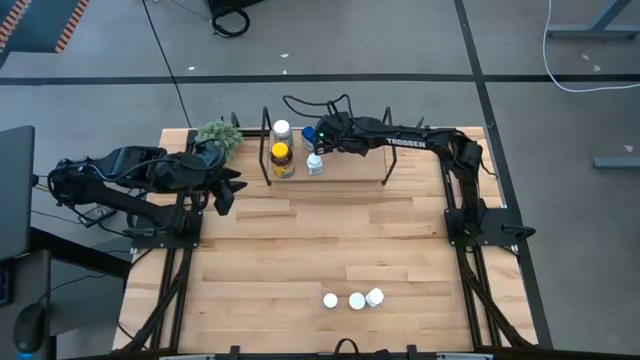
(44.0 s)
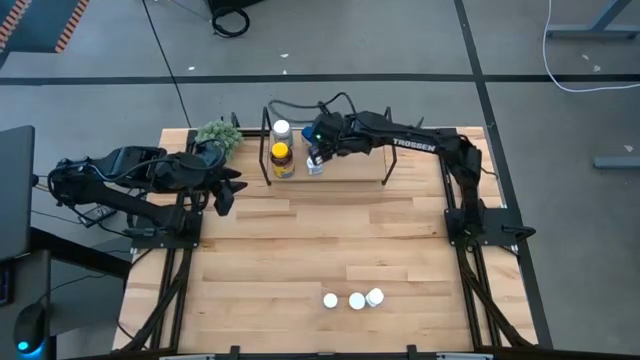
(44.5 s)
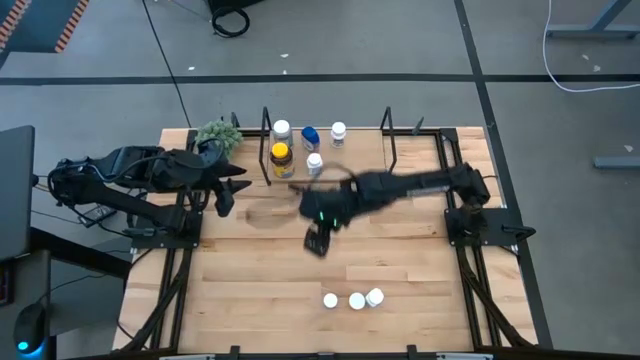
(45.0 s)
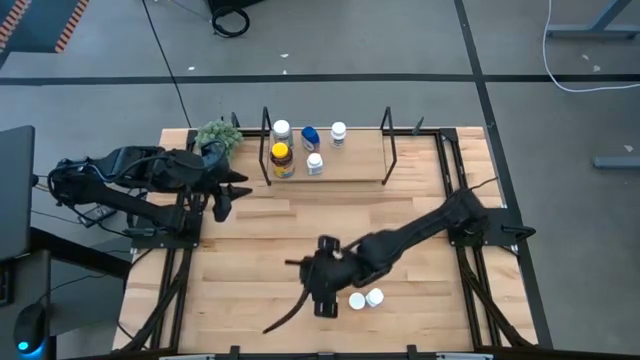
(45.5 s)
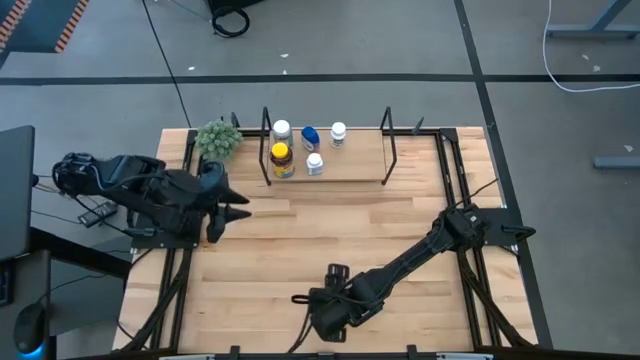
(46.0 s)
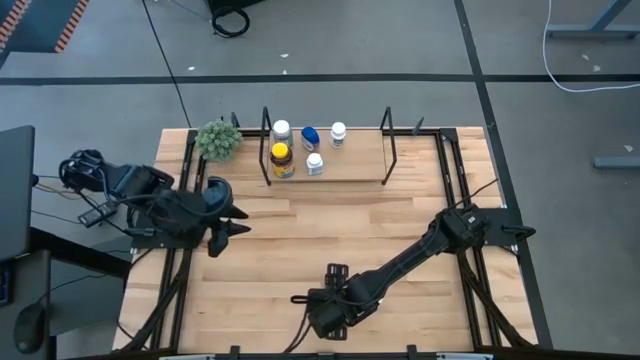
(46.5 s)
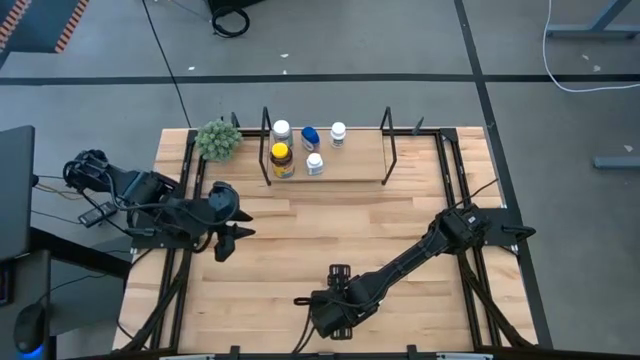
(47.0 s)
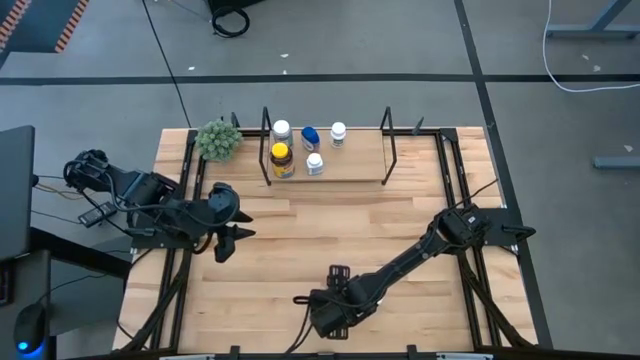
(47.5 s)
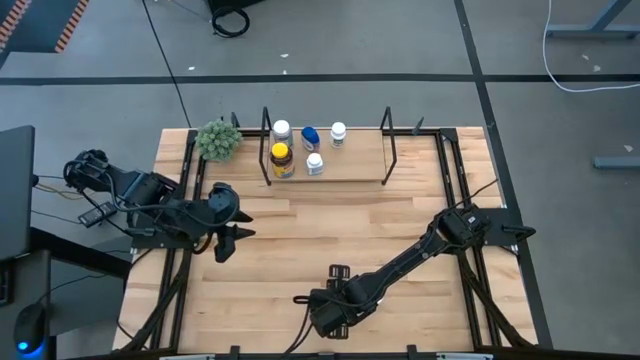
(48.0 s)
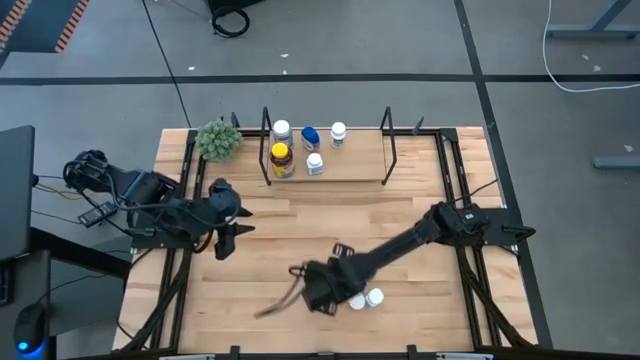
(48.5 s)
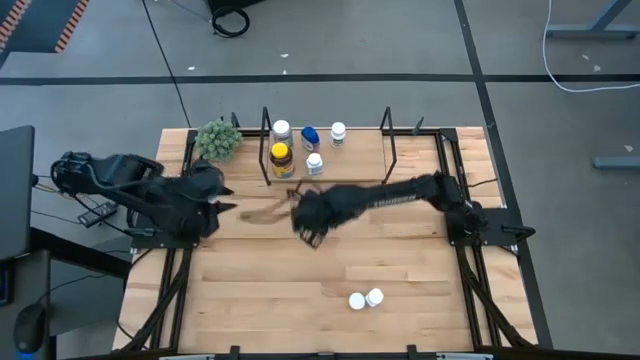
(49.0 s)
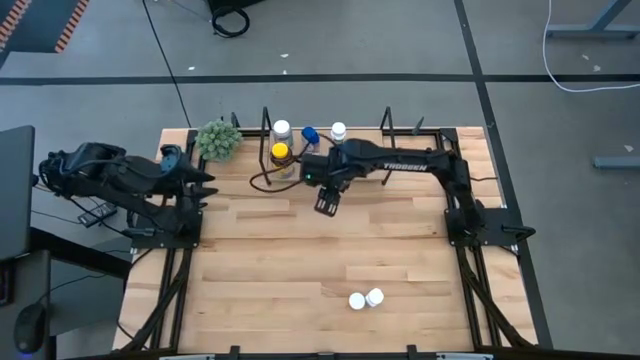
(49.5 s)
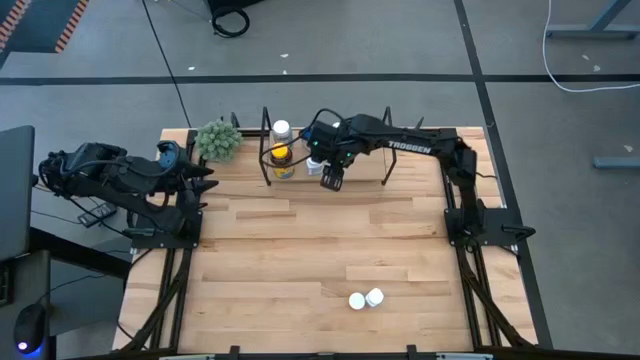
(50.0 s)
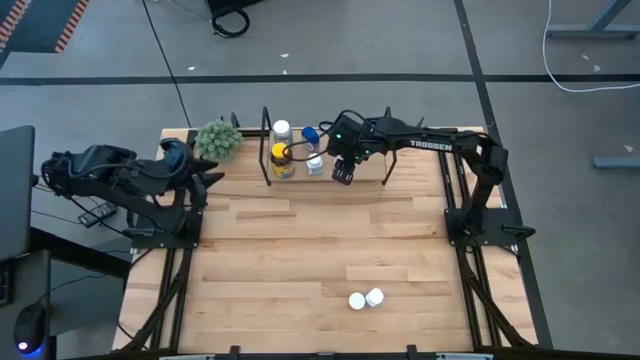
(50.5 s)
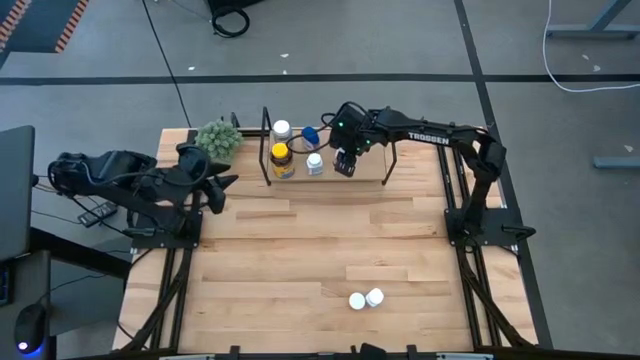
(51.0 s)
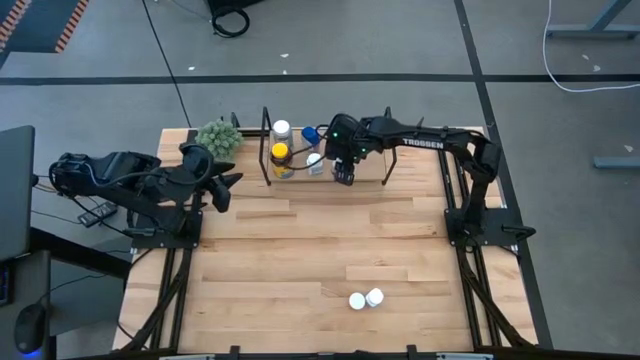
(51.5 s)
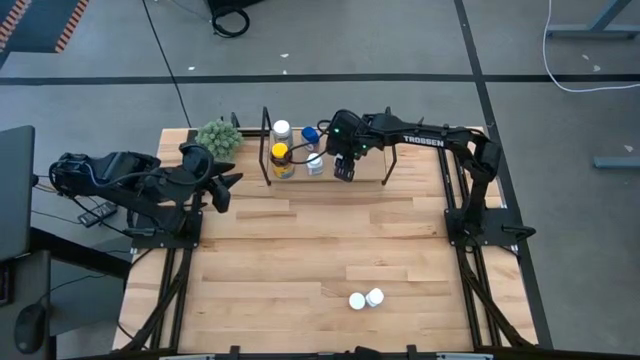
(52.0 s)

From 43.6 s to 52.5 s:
Task: Pick and place medicine bottles onto shelf by color
Put the pink medicine bottle on the shelf

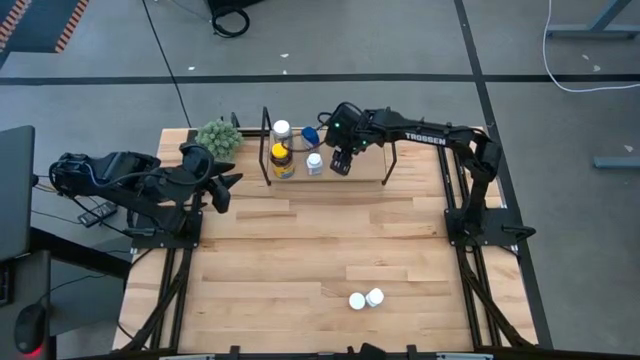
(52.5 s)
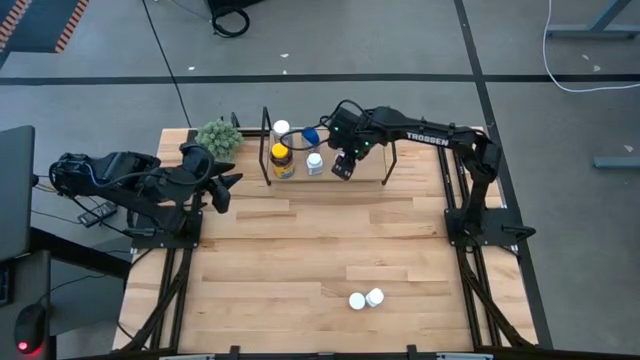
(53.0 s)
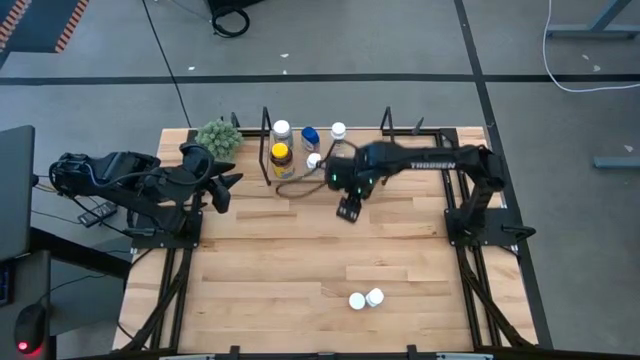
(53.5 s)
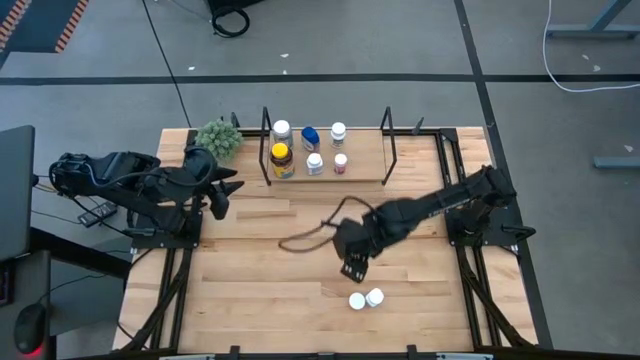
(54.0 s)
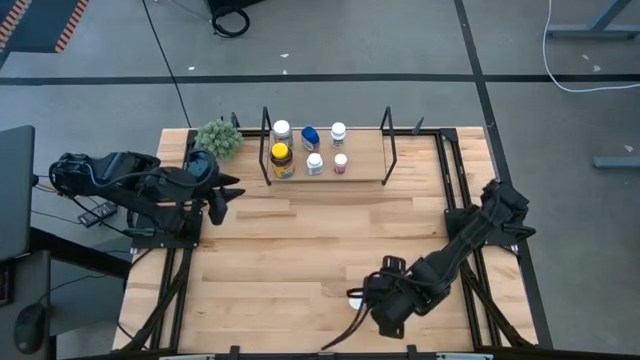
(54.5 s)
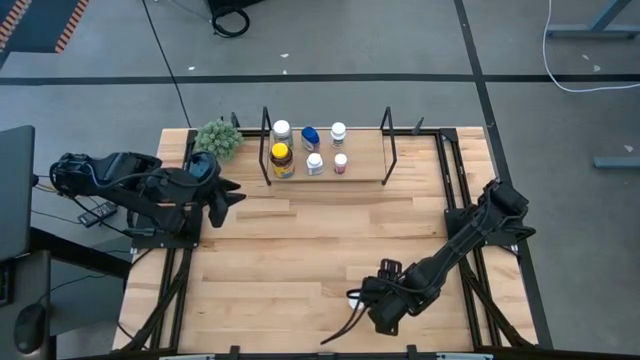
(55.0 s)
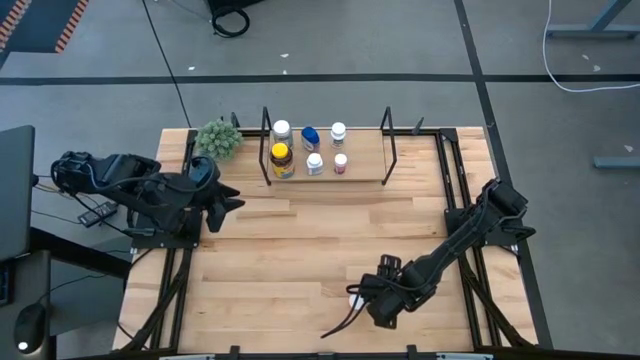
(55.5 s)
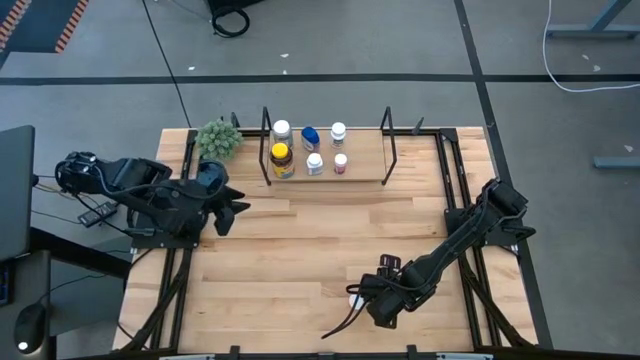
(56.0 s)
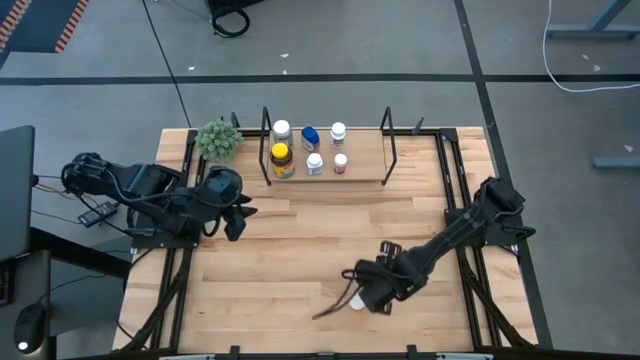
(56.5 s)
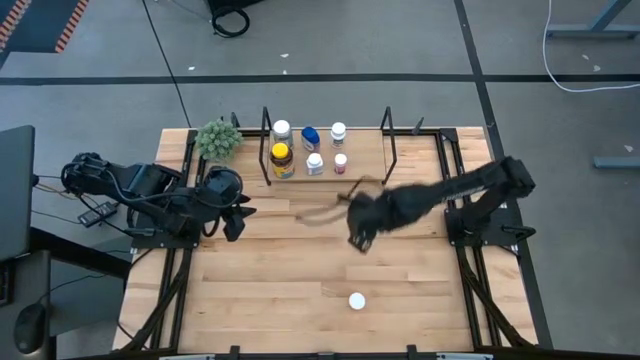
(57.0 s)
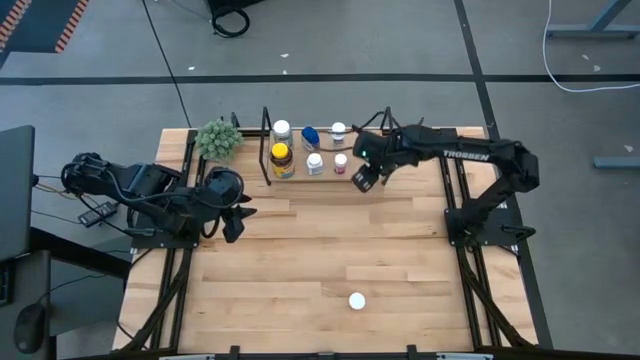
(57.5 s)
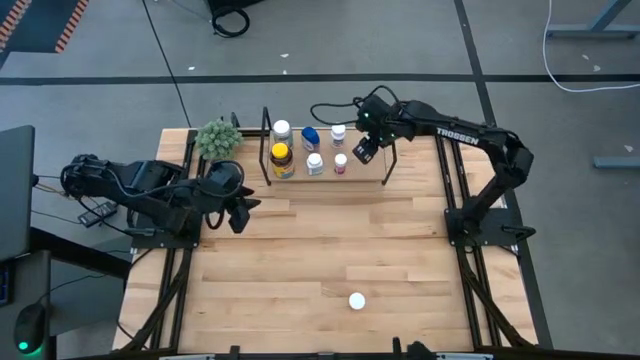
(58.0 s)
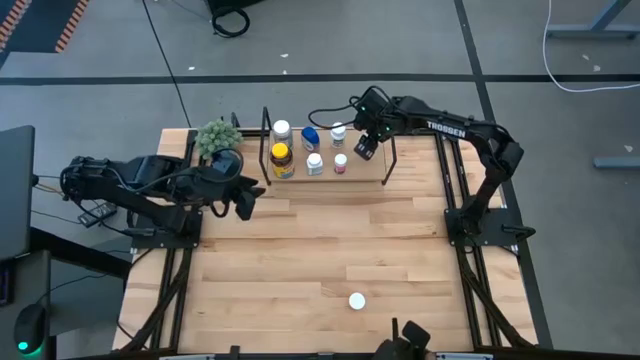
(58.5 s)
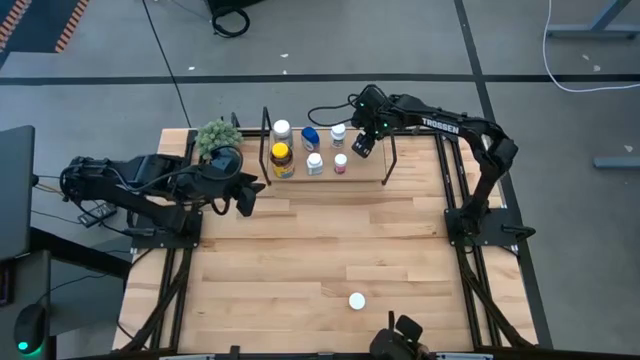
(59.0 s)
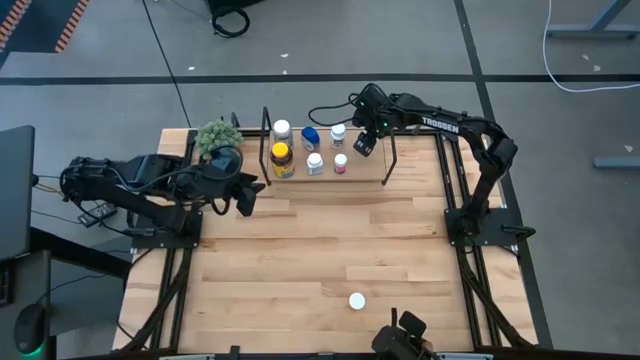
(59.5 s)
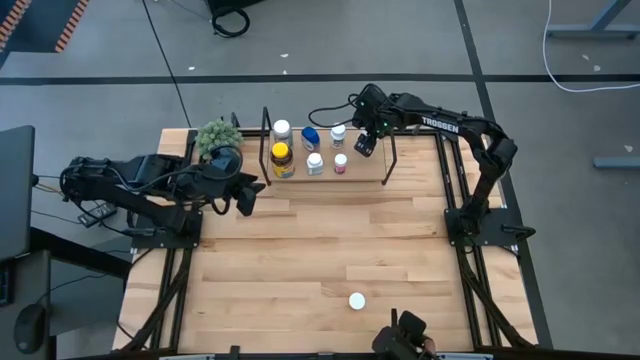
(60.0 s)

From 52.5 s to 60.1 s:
Put the white and blue medicine bottle on the shelf

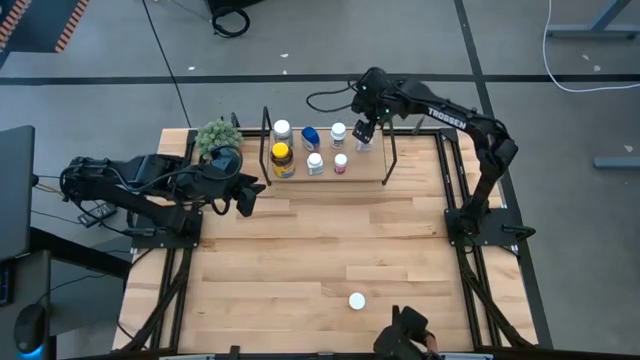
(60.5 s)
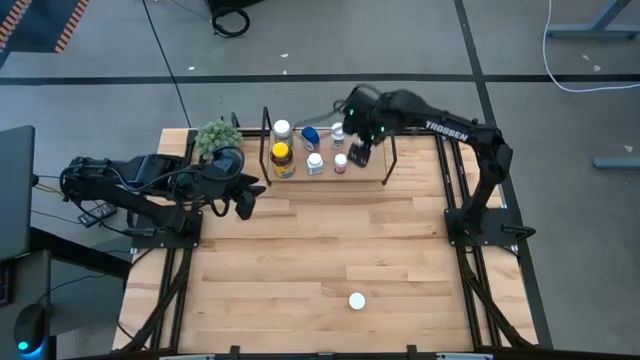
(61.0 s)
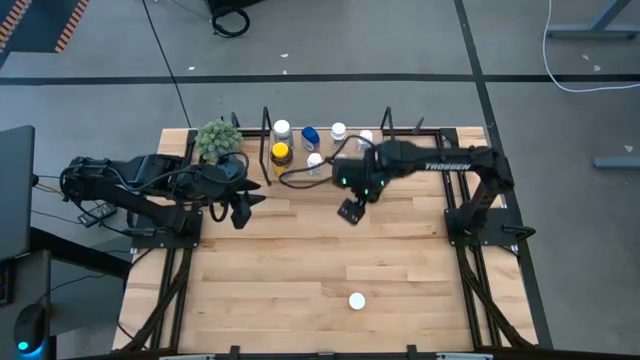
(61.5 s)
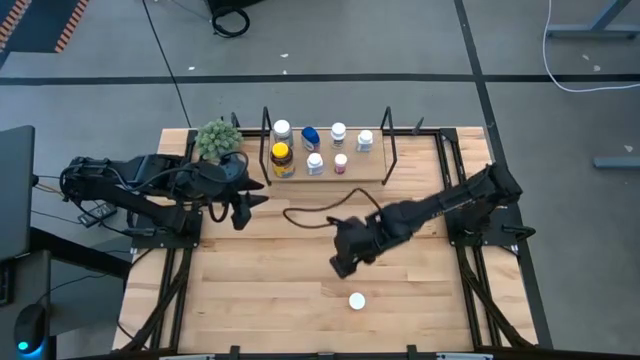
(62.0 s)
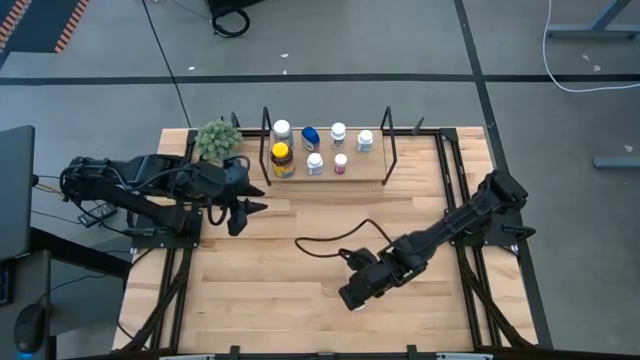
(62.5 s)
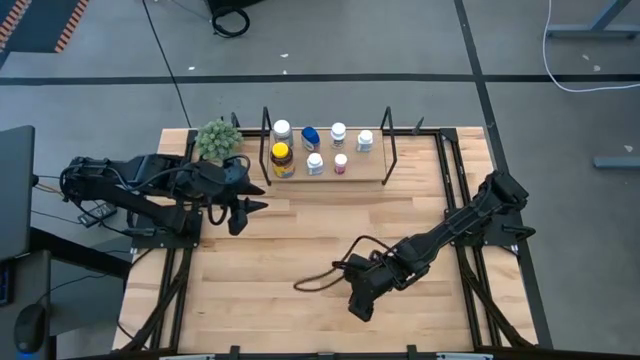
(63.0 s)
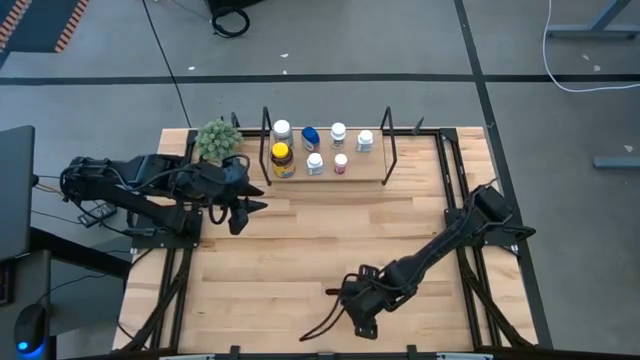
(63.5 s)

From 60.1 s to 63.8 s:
Put the orange medicine bottle on the shelf
